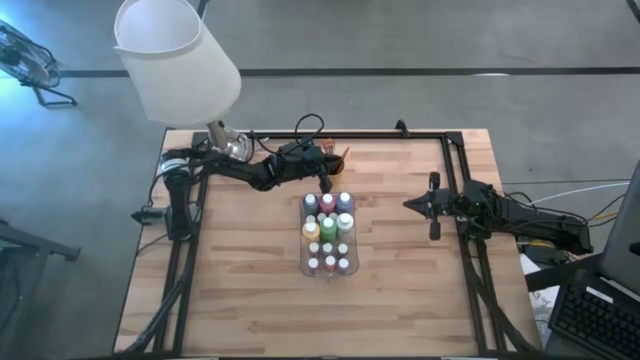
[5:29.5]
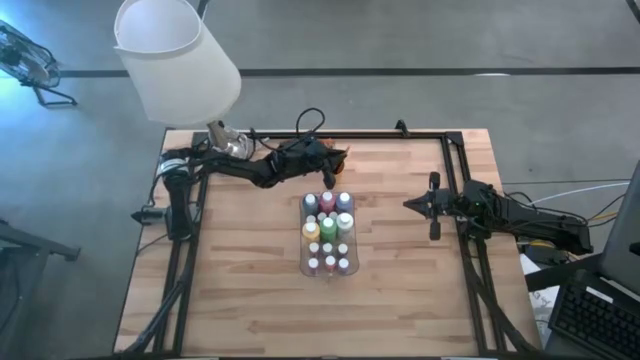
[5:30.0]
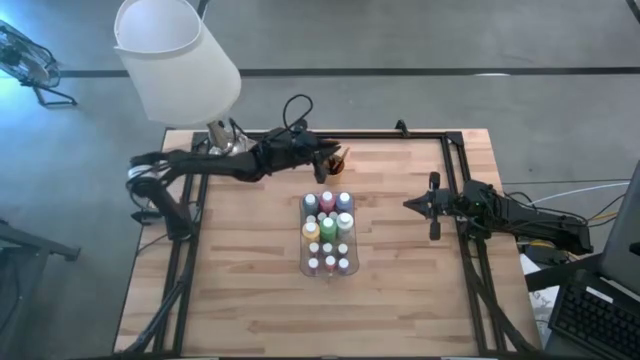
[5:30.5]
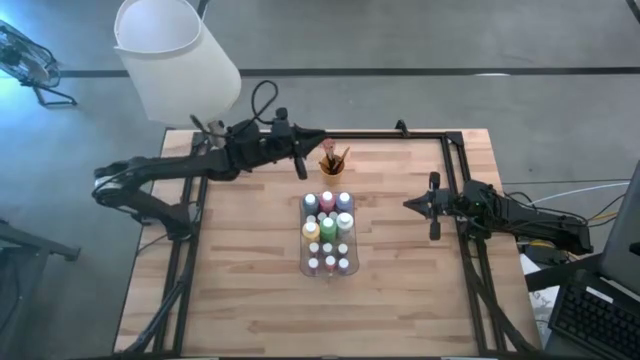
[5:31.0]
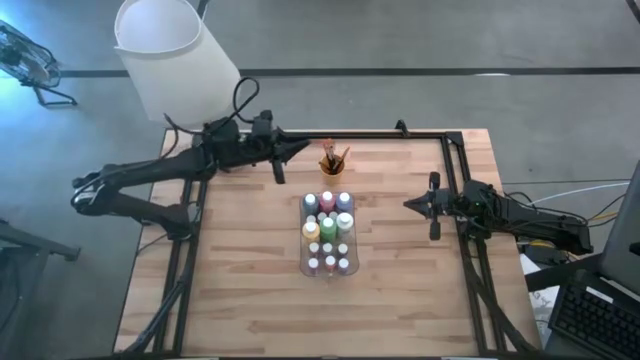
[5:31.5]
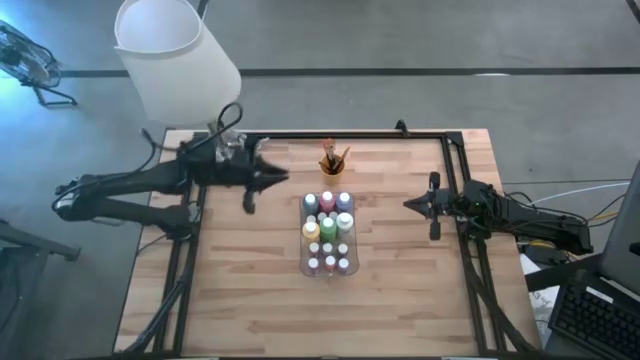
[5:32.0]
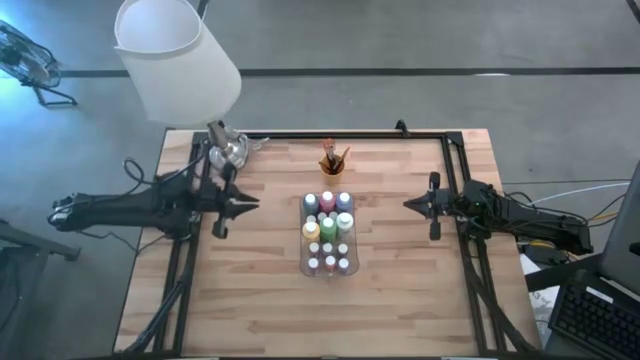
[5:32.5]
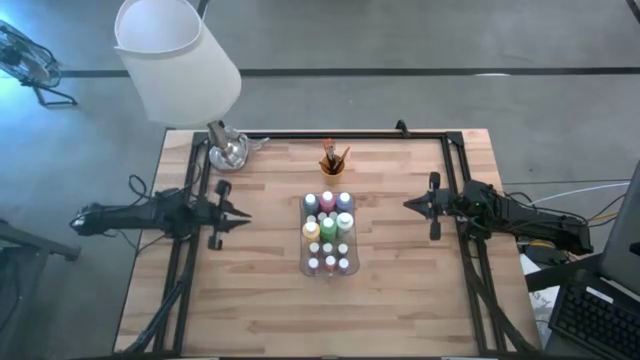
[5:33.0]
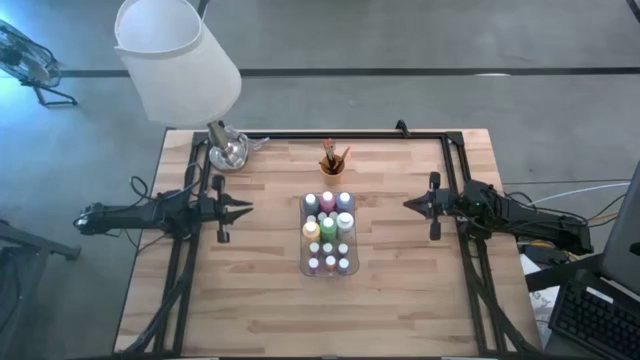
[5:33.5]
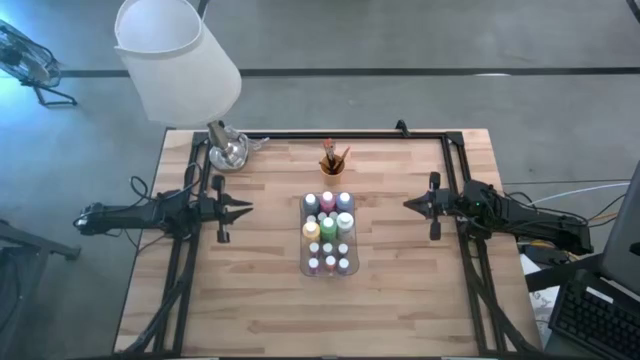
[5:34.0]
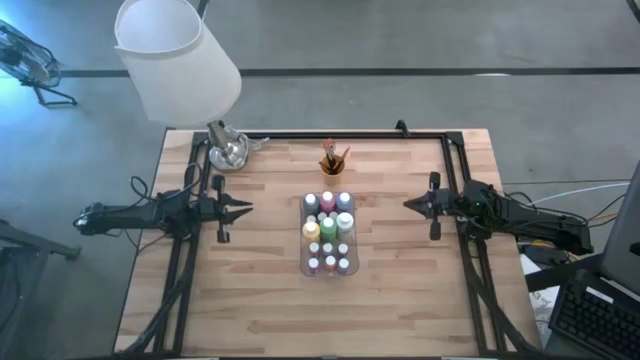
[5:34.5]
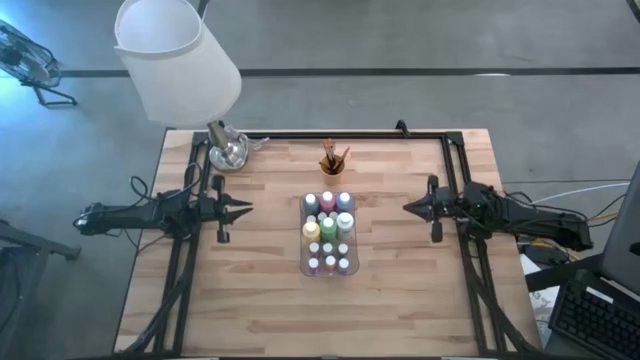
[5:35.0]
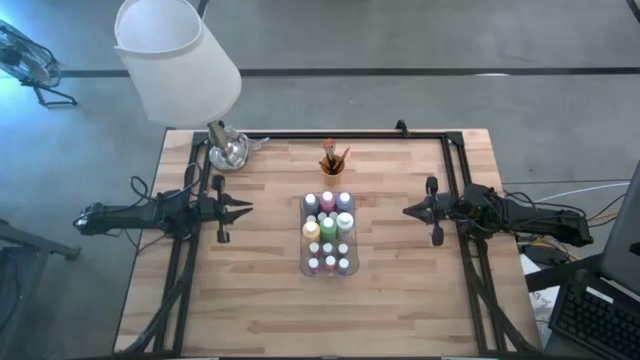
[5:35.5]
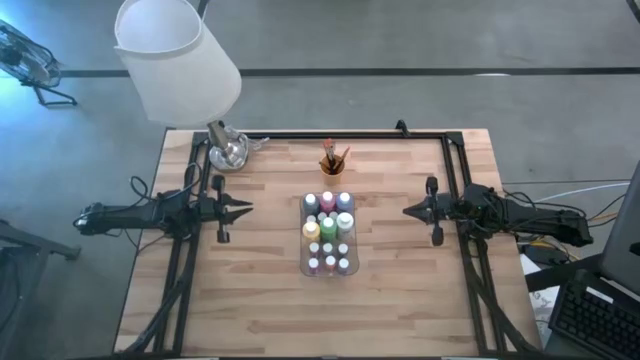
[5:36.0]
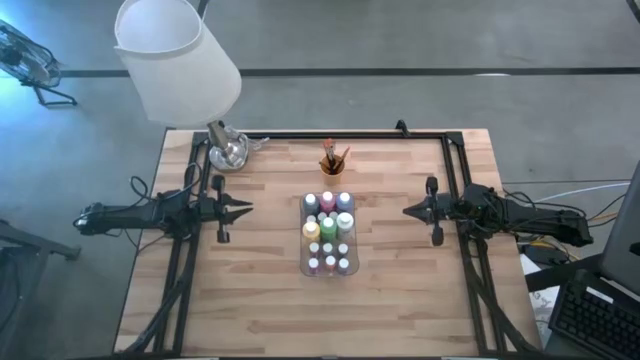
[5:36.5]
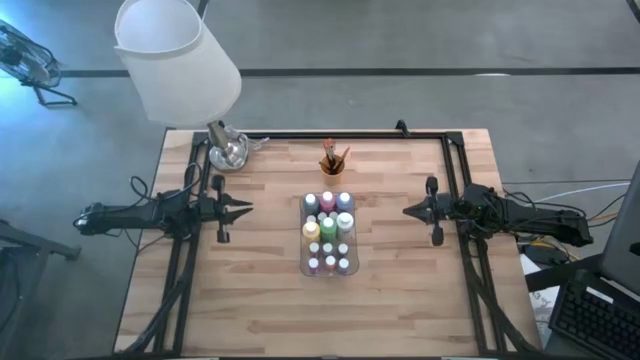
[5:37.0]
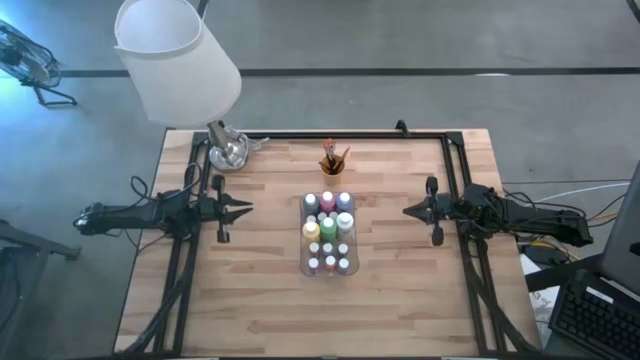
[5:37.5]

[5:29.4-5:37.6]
Task: Pick & Place Paint Supplies
Return to Home Position

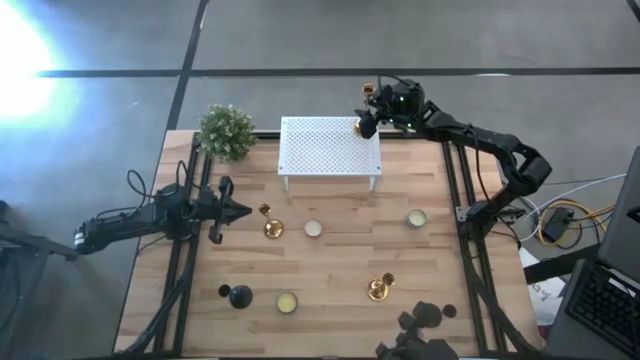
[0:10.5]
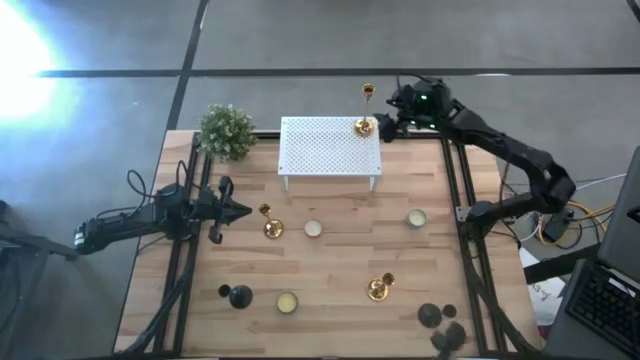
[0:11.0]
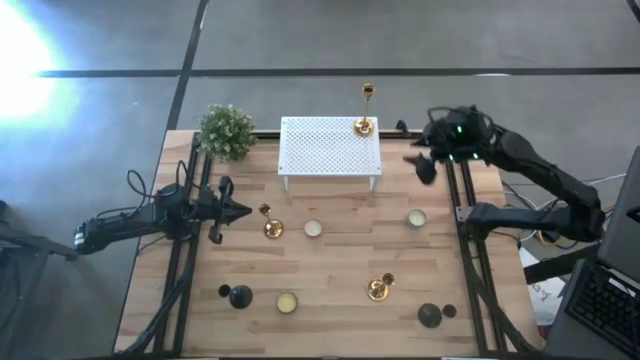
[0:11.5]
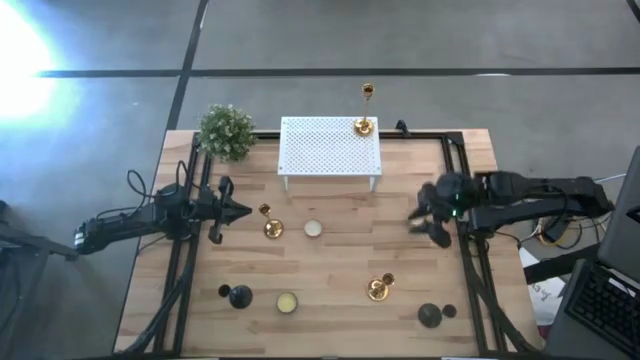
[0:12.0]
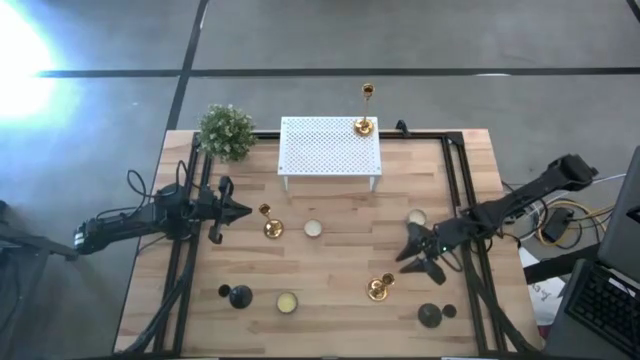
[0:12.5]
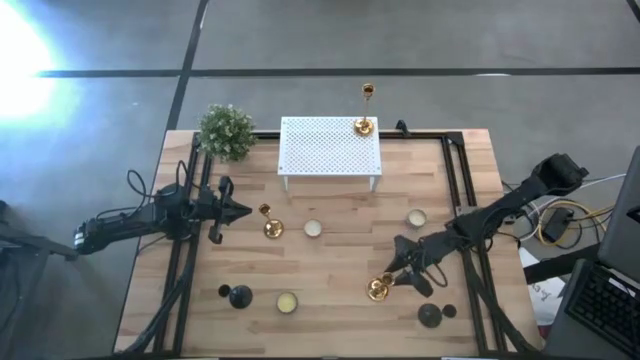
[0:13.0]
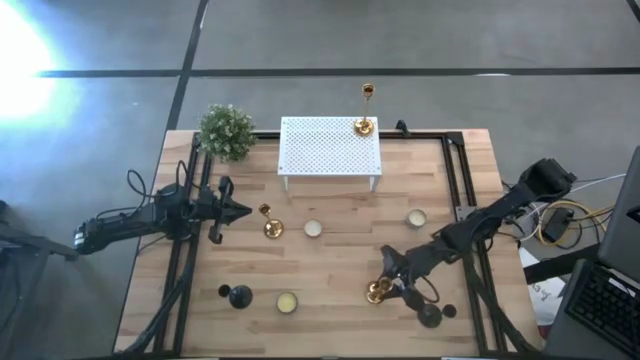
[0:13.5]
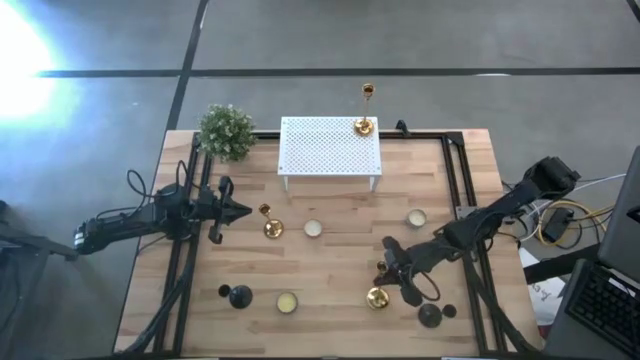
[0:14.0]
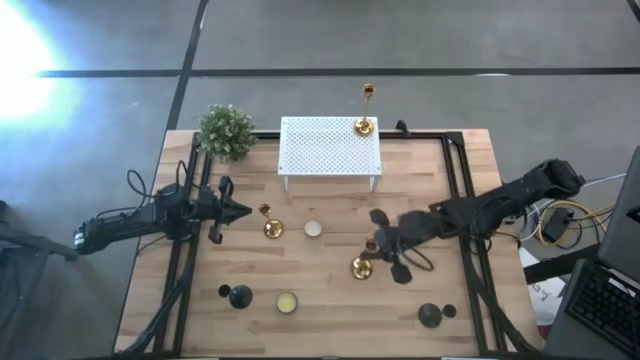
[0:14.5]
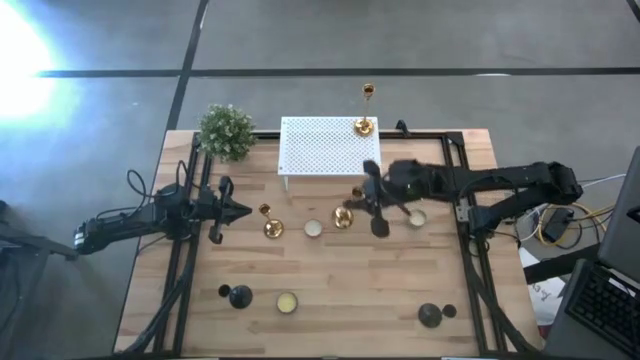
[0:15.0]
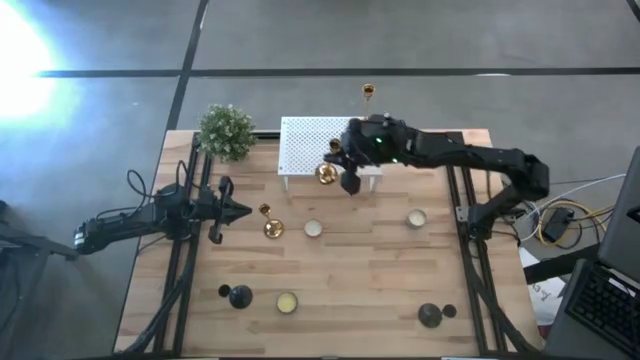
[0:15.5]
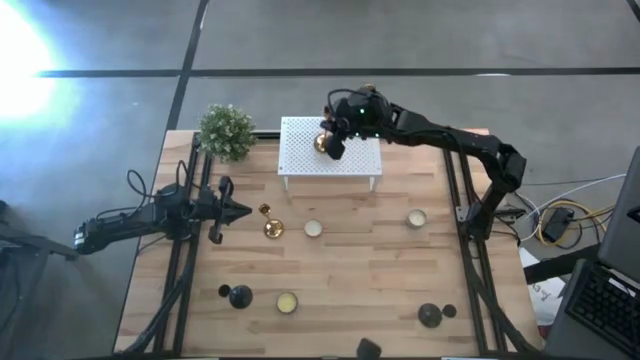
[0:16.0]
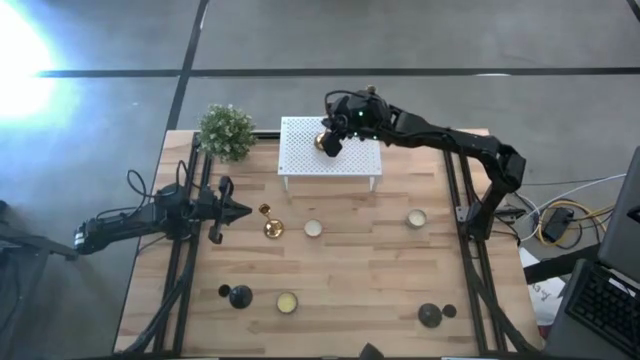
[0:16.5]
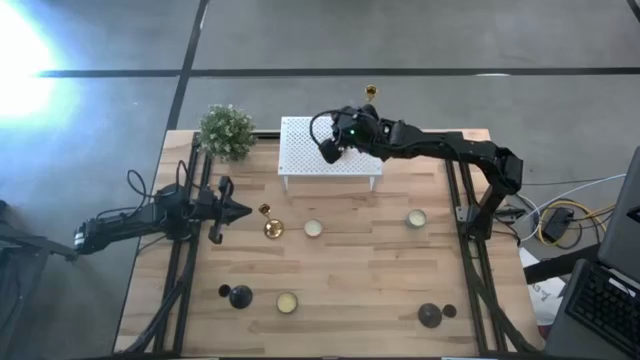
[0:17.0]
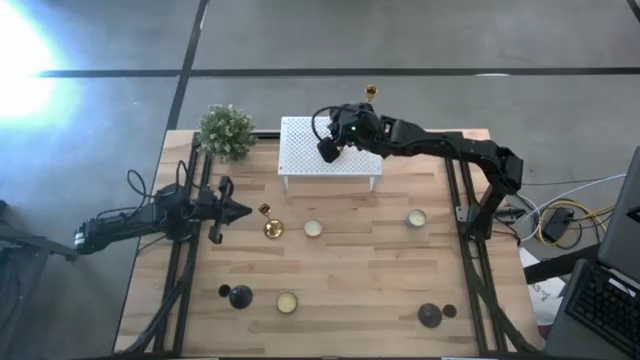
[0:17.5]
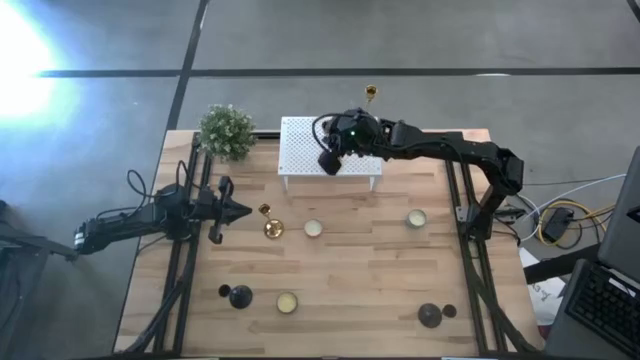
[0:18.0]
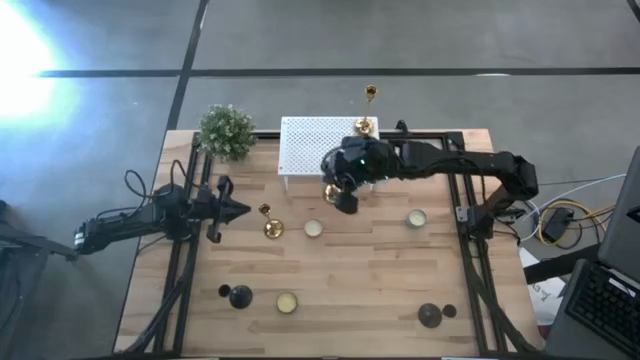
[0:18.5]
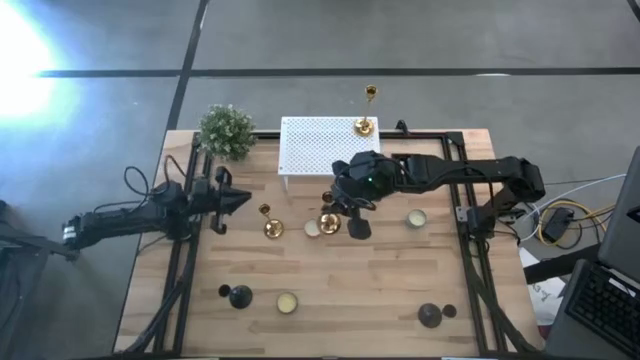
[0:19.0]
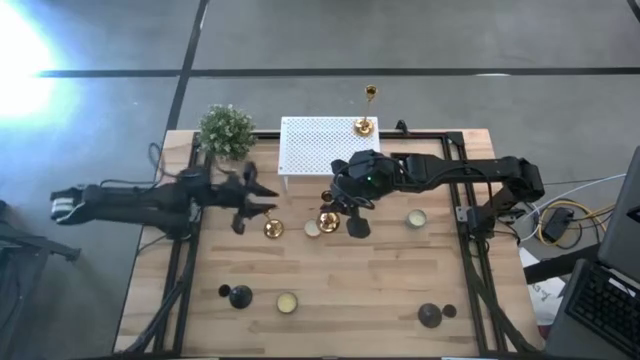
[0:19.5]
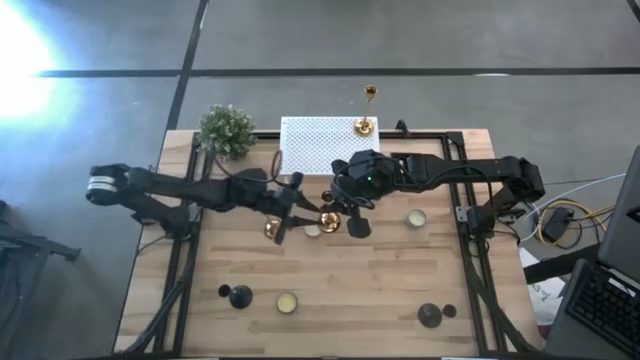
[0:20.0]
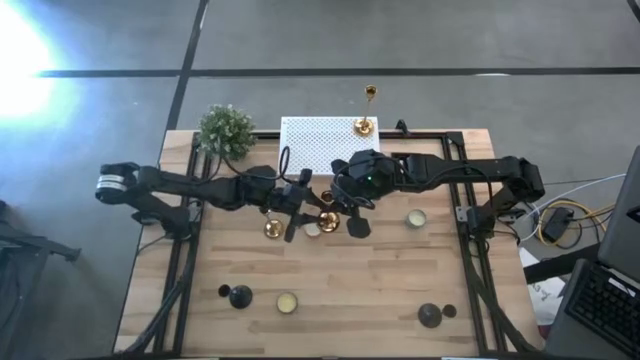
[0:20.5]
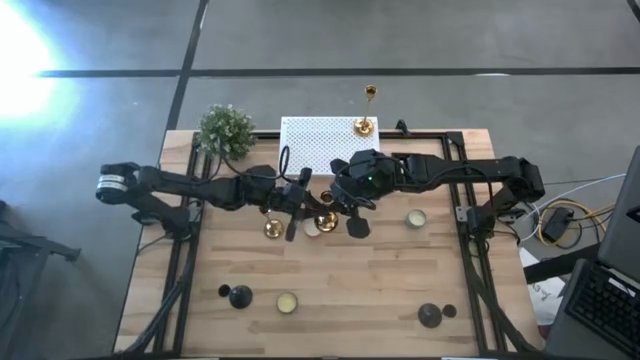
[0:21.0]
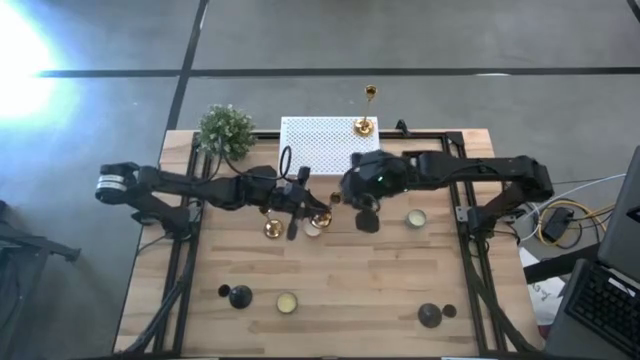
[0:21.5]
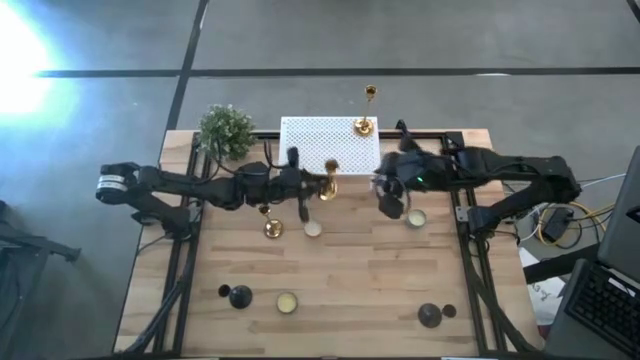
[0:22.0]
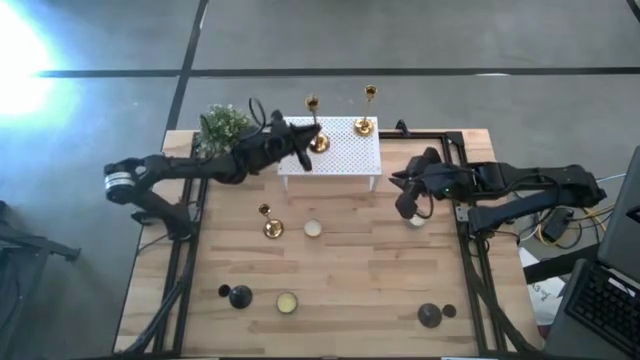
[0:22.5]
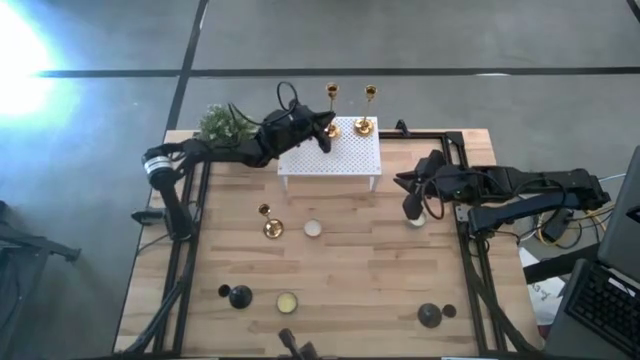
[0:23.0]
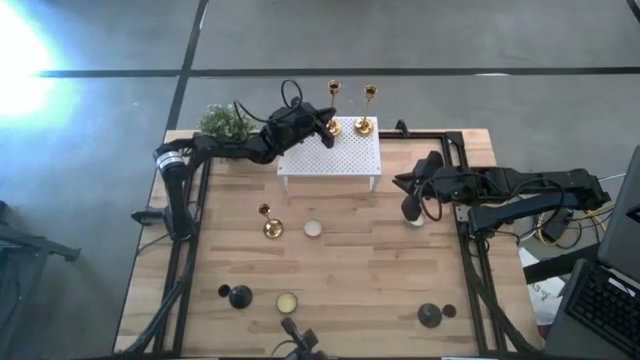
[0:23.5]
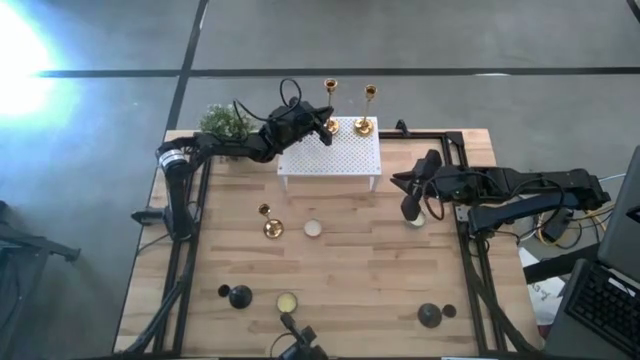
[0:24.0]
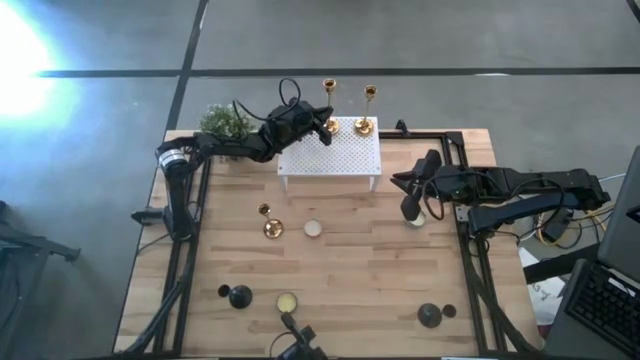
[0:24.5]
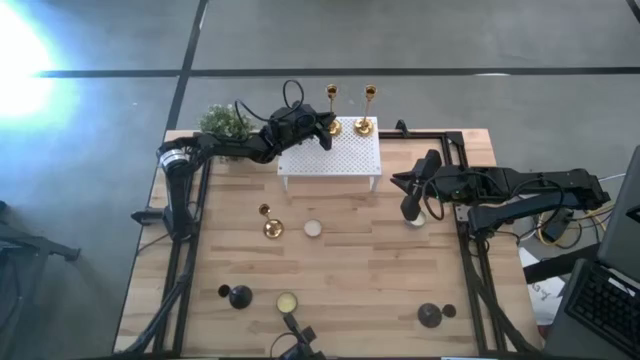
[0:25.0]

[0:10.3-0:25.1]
Task: Pick & Place candle stick holders
Put the right golden candle holder on the shelf aligned with the other golden candle holder
